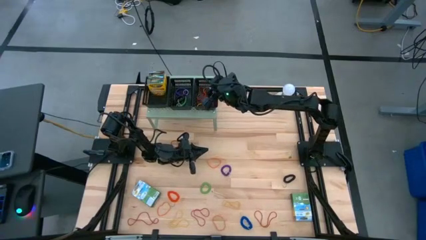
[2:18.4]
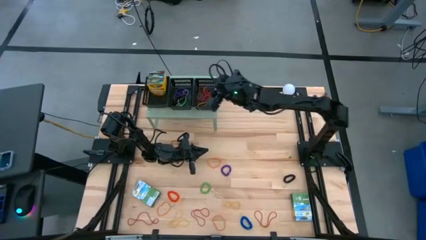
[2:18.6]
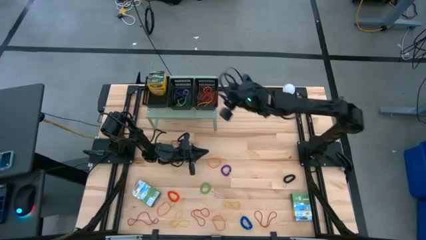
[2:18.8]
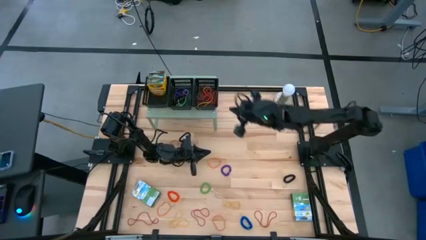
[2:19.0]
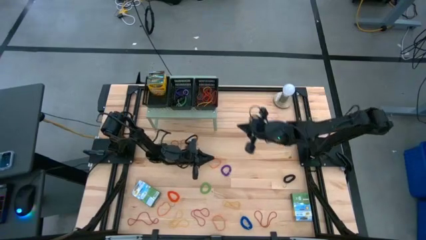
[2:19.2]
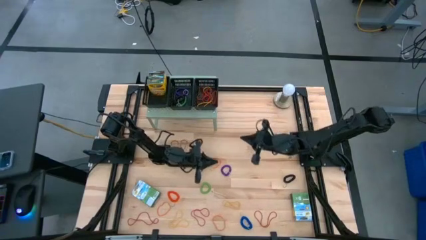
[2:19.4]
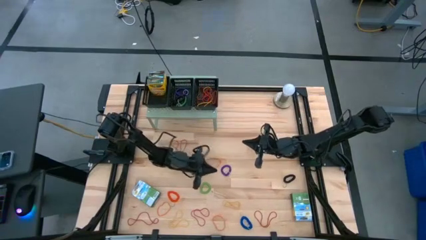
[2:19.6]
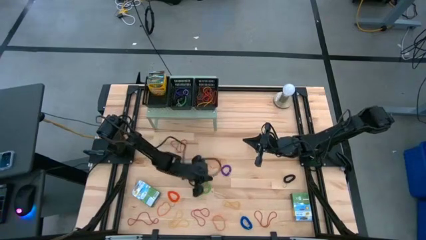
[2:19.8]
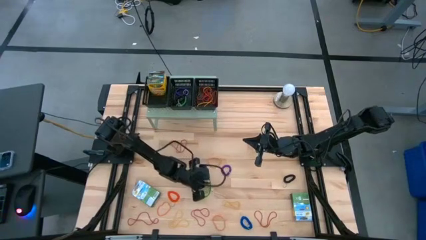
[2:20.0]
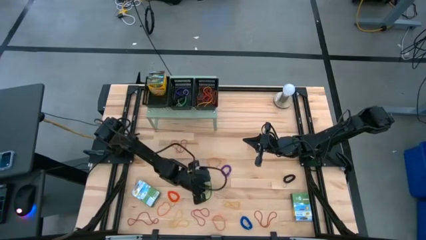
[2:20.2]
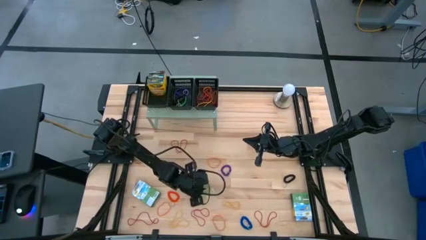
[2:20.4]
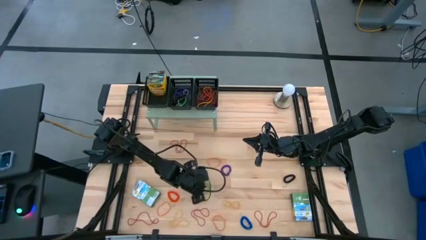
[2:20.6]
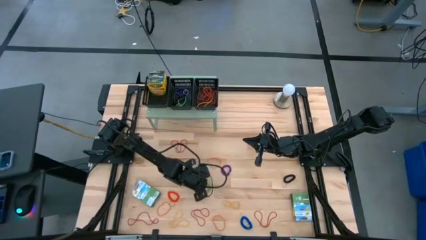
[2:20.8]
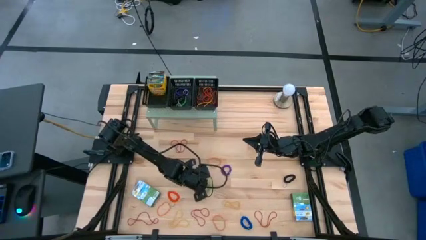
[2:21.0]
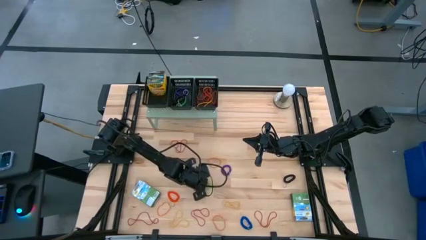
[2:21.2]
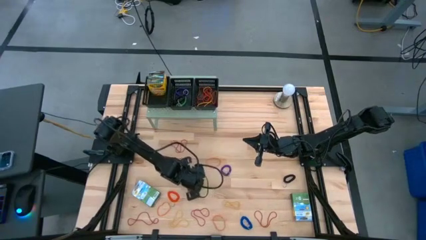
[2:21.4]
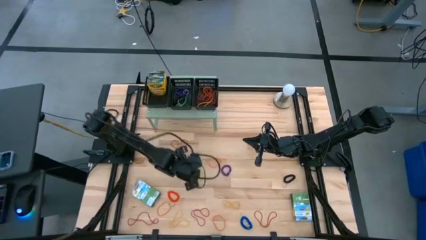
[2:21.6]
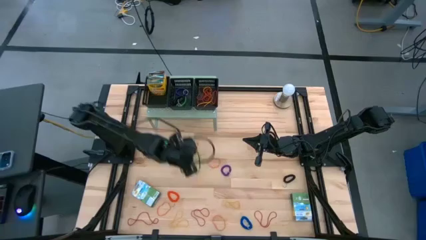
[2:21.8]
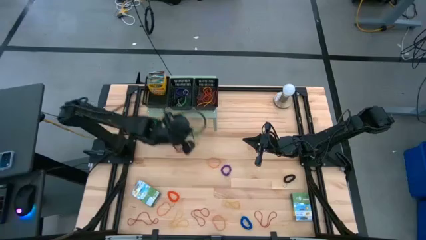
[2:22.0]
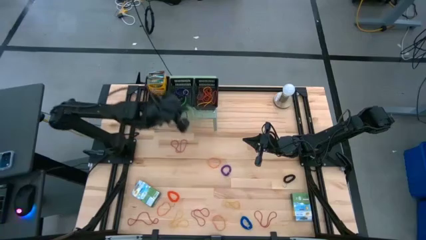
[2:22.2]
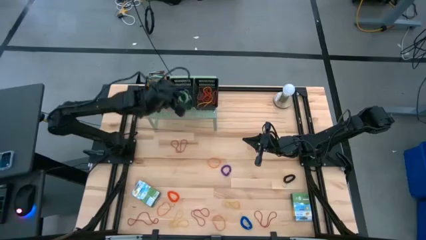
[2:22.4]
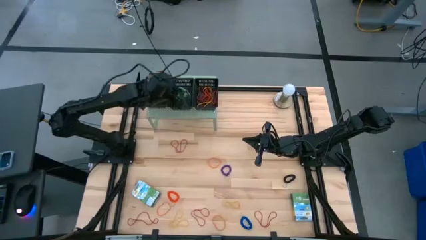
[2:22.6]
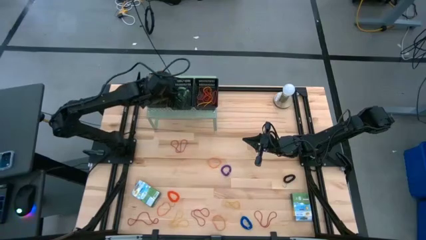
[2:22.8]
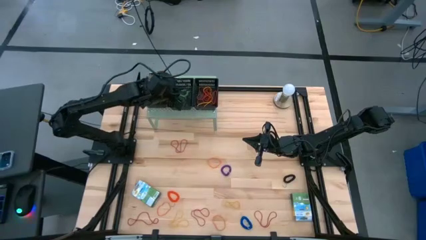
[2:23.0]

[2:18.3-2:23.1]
Task: Pick & Place Office Desk Supplies
Put the green spring rubber band into the middle black bin on the shelf

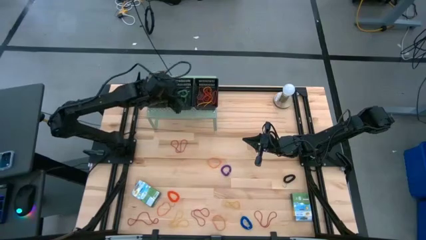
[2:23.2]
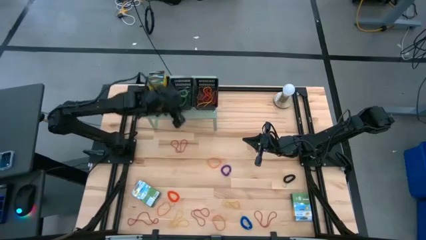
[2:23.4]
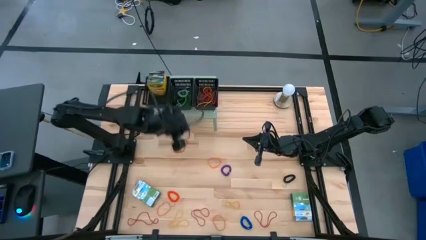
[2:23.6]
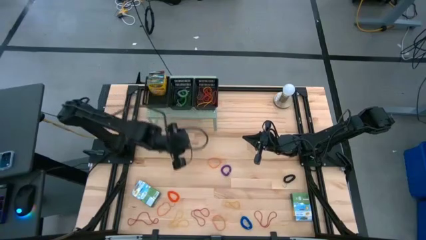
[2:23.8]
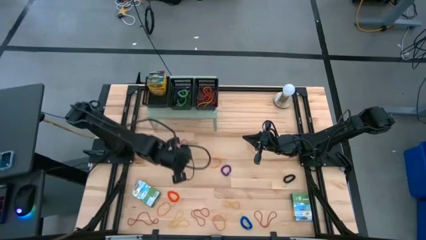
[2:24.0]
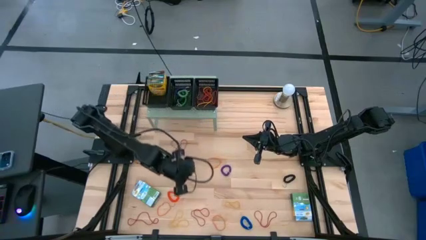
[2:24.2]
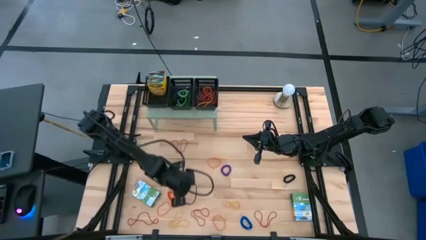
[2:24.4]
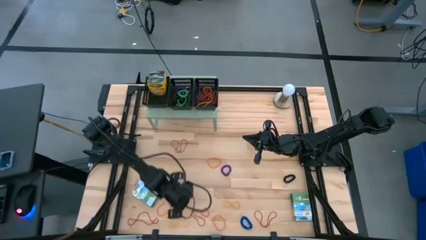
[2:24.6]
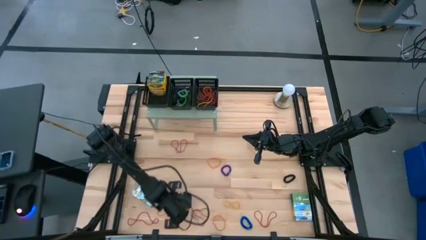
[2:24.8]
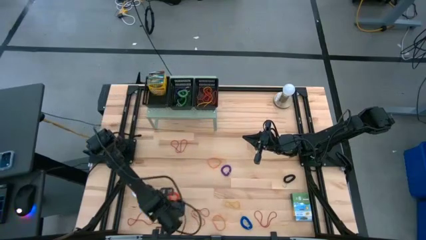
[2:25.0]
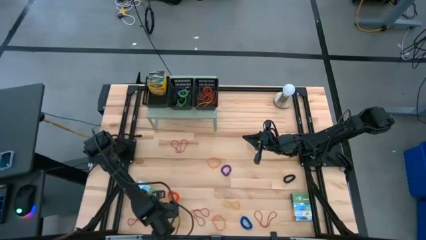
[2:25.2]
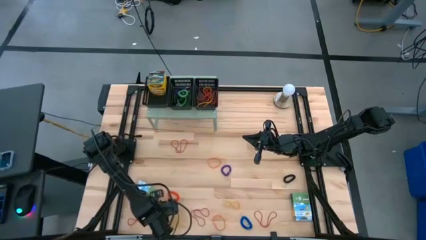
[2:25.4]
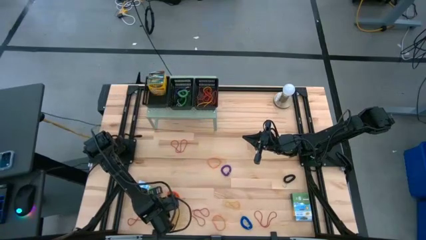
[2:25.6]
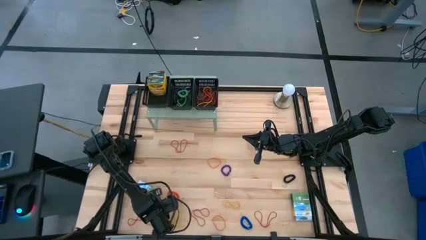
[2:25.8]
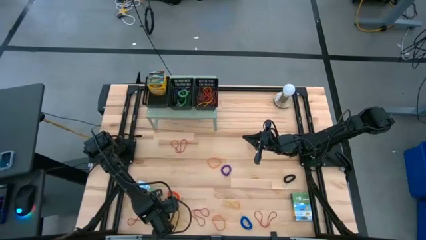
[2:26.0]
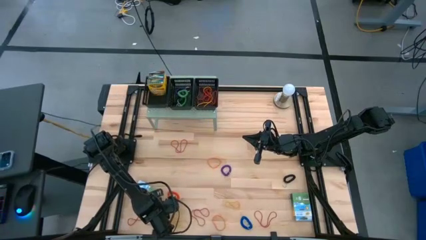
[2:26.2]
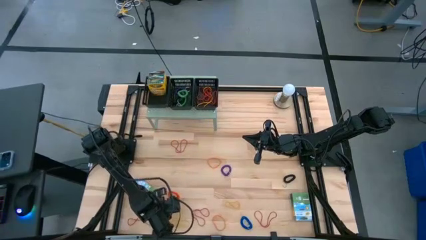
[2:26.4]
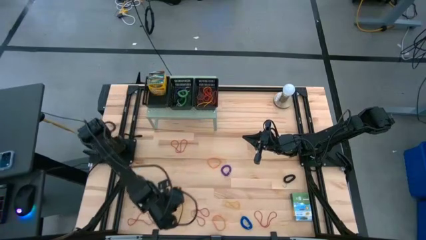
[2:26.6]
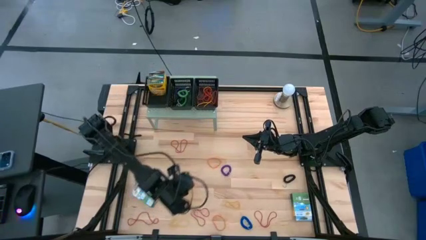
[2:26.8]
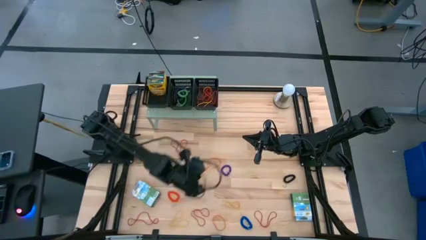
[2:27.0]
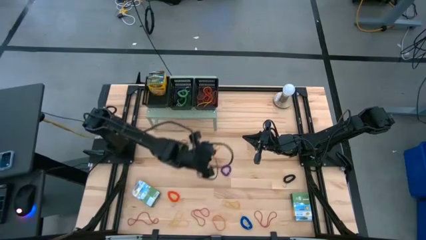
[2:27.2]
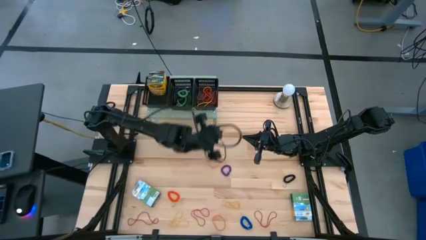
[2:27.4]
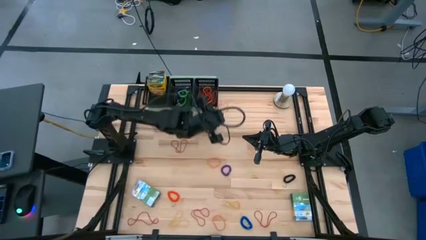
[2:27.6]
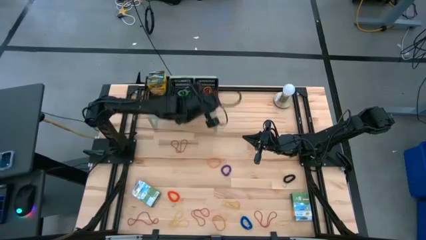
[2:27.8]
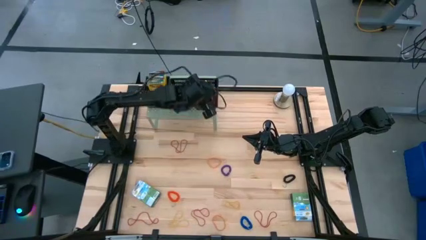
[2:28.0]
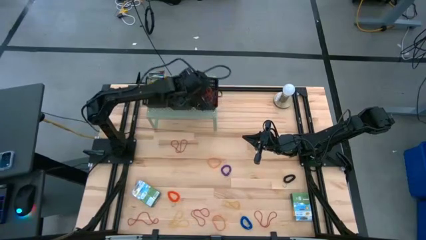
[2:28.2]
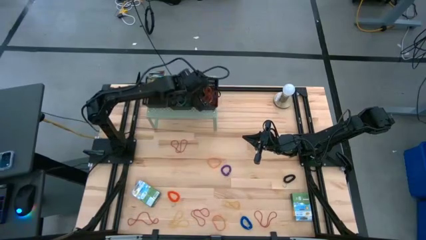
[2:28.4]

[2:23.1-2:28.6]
Put the orange rubber band into the right black bin on the shelf

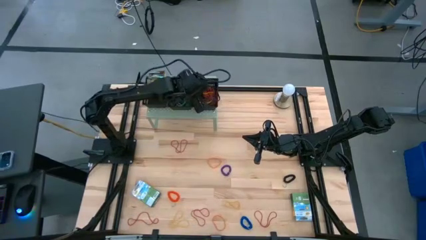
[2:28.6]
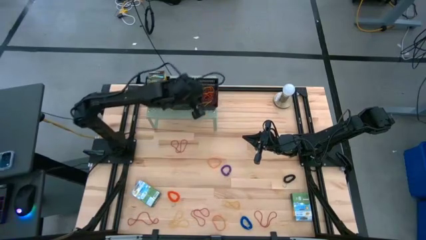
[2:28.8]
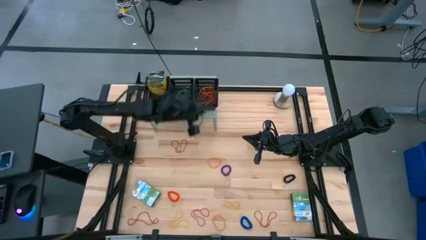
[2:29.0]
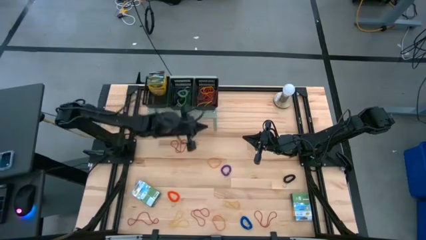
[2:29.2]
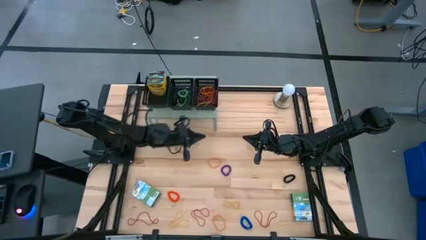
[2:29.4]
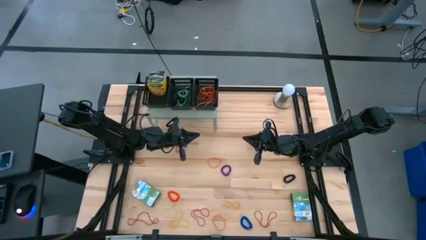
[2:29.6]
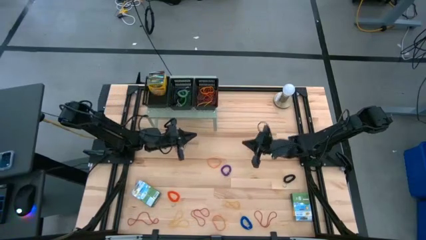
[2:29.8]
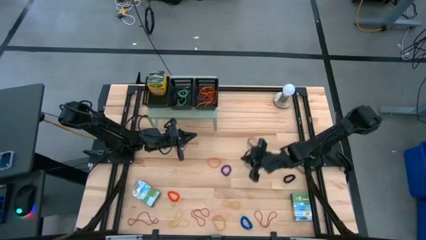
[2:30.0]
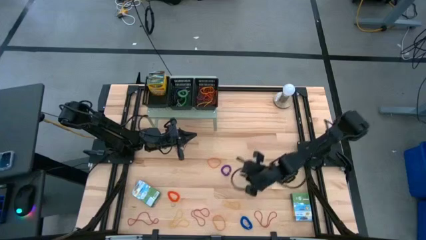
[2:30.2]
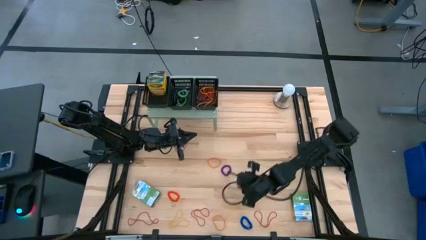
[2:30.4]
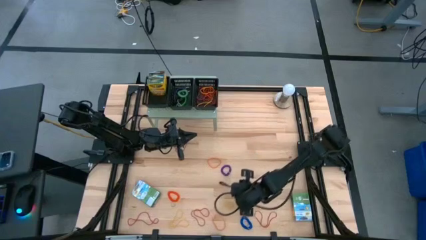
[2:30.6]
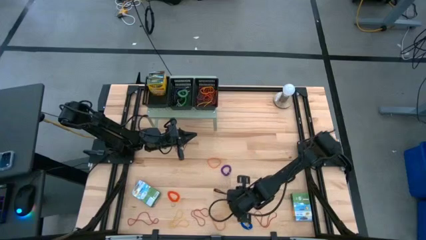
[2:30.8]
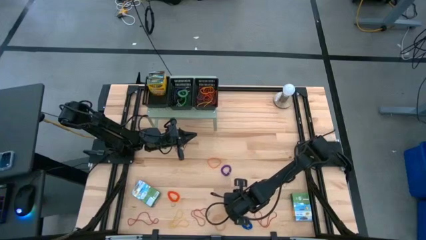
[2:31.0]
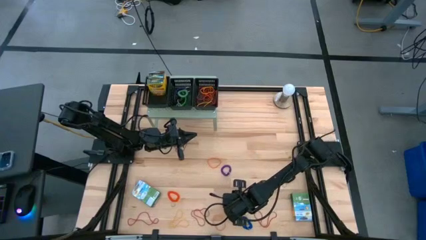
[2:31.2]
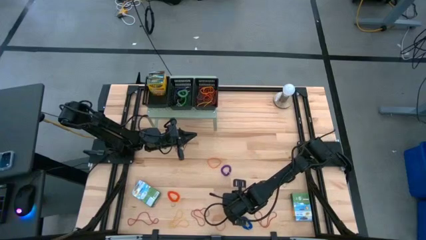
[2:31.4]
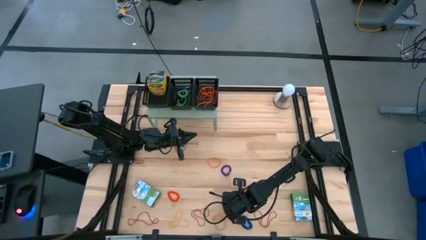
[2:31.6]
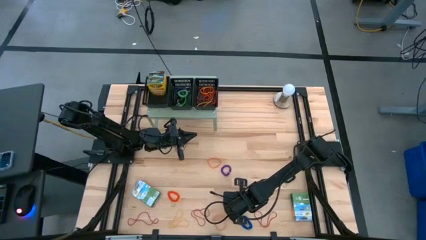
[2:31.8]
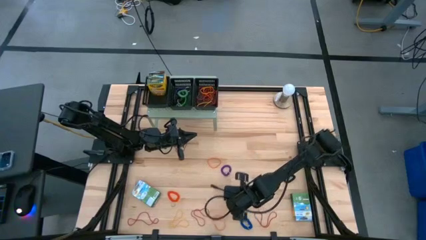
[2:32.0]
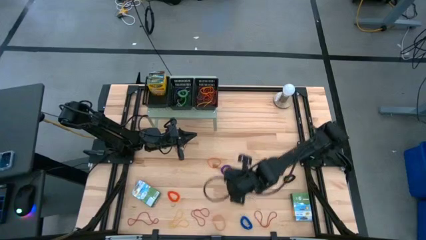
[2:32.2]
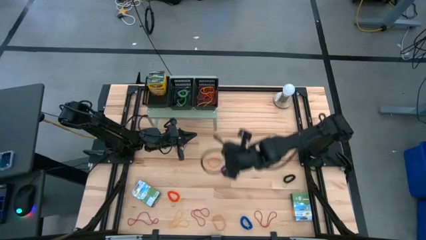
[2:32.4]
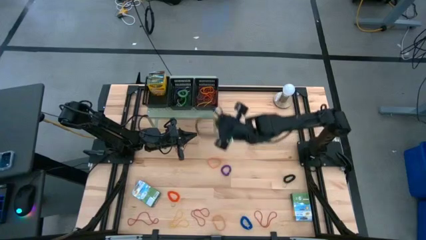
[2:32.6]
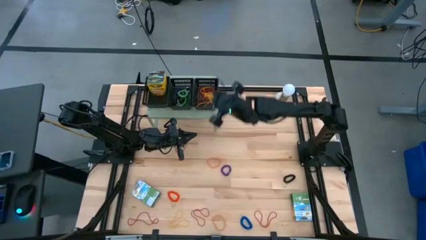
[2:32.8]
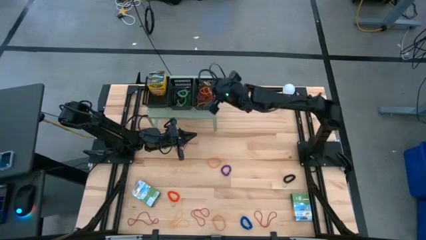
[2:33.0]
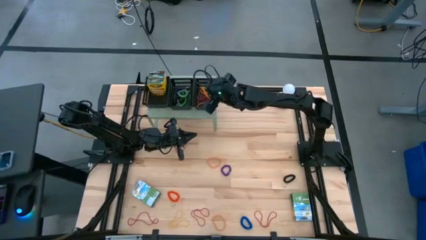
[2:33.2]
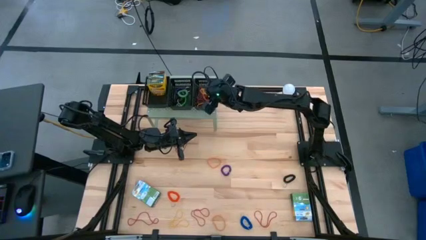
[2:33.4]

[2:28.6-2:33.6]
Put the yellow rubber band into the right black bin on the shelf

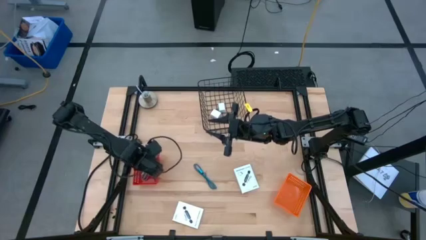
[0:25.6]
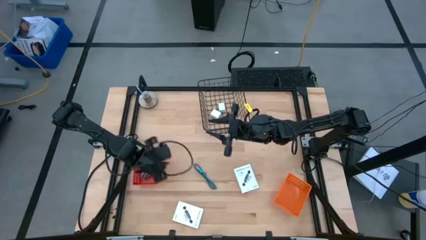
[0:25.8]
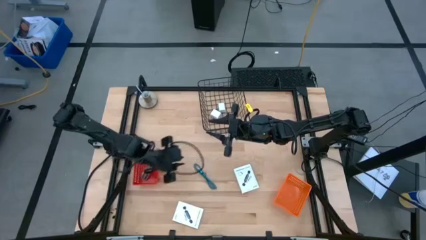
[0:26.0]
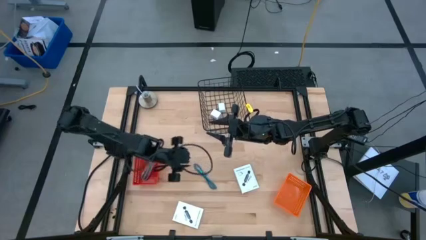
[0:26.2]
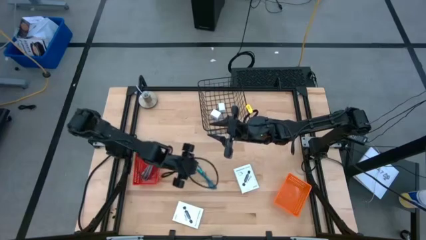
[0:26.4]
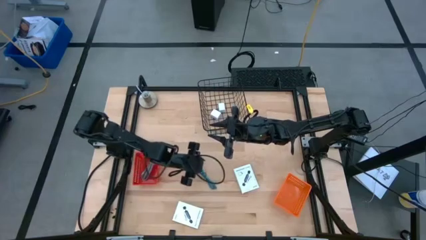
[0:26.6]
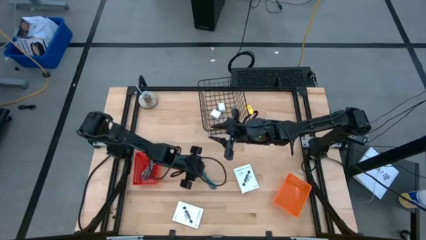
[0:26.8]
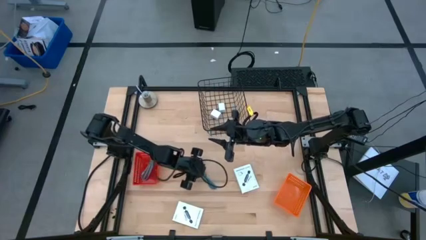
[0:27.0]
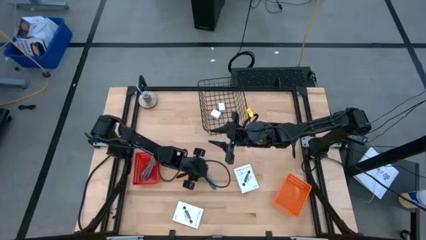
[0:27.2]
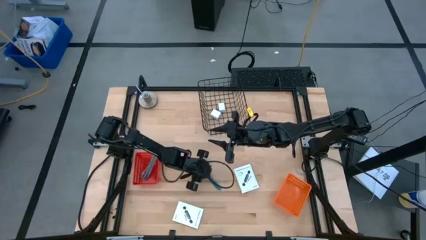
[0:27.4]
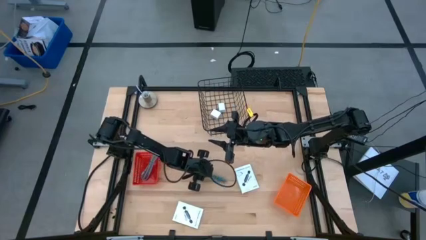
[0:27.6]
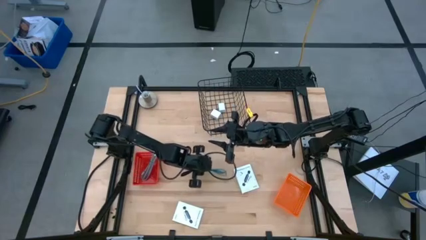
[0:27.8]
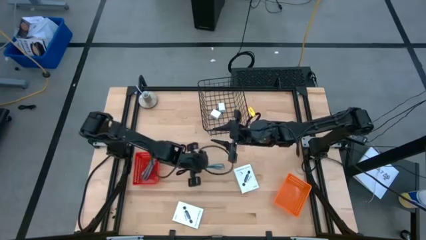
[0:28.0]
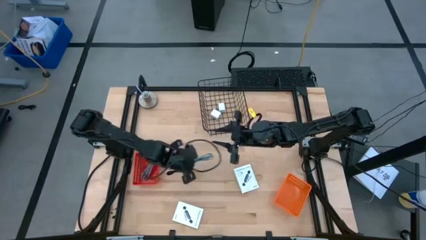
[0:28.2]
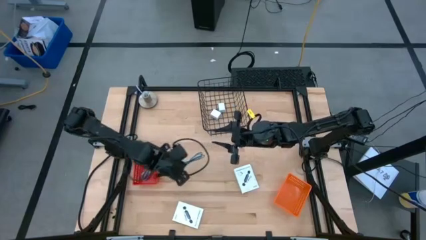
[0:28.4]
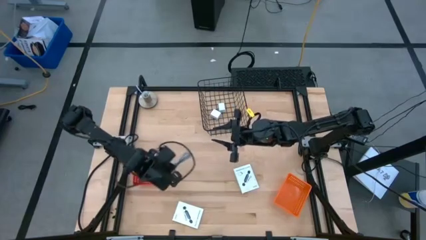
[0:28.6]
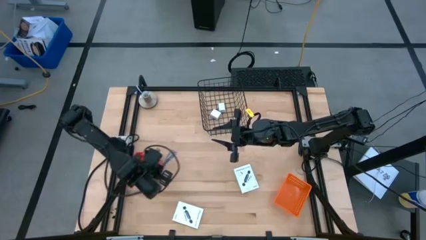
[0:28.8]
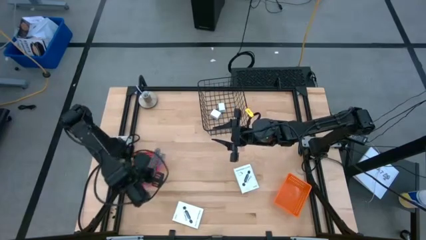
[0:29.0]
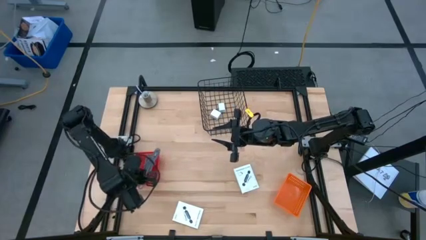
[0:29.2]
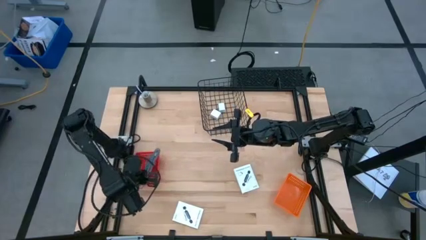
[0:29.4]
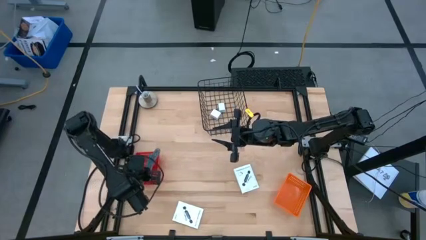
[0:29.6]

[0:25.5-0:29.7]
Task: Pick and place items into bin
Put the blue black striped charger cable into the red basket
